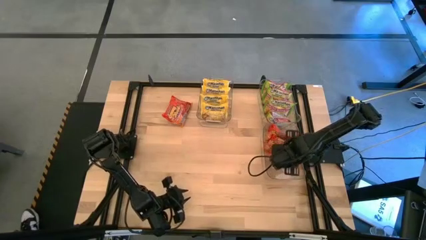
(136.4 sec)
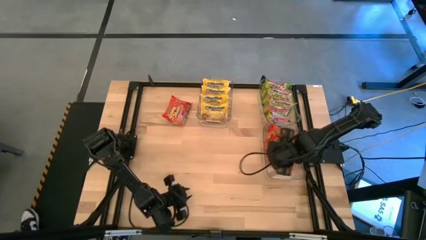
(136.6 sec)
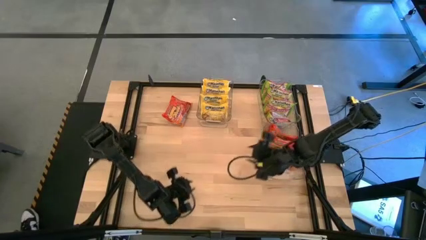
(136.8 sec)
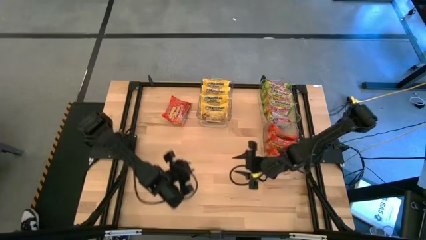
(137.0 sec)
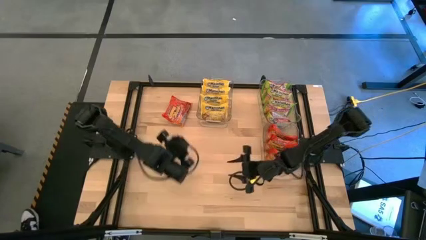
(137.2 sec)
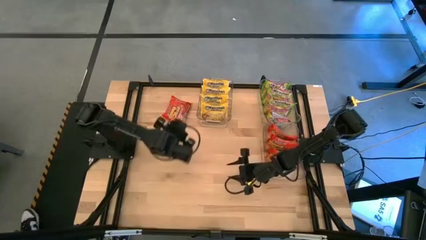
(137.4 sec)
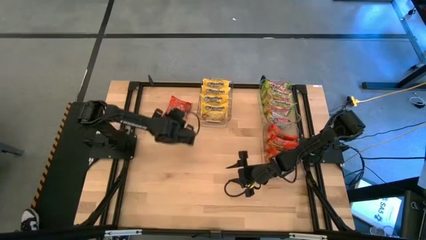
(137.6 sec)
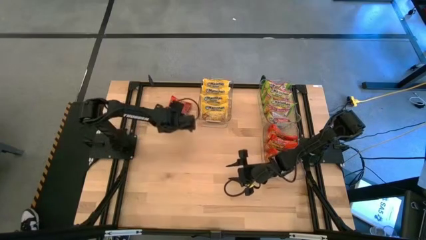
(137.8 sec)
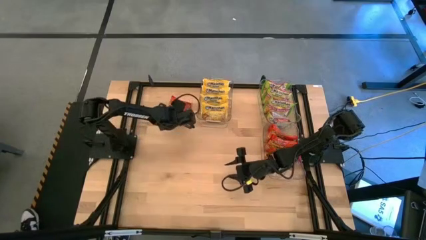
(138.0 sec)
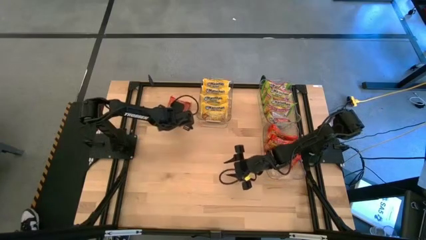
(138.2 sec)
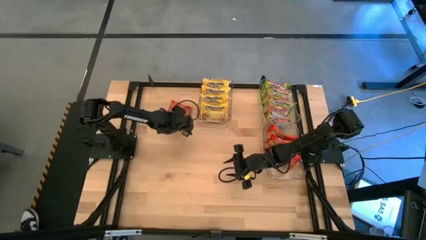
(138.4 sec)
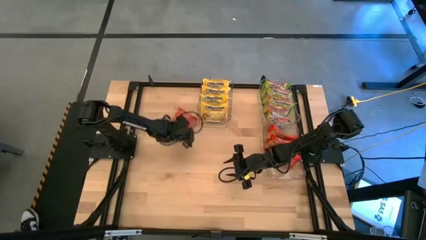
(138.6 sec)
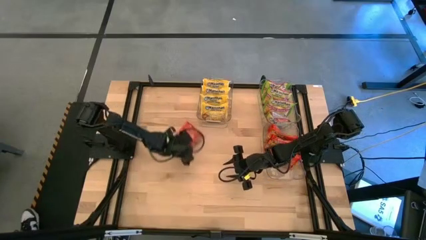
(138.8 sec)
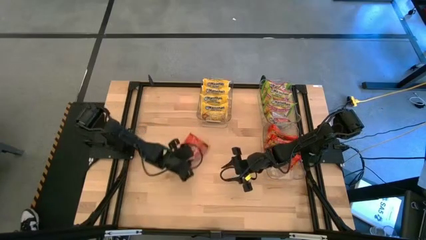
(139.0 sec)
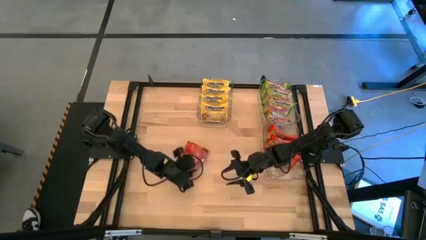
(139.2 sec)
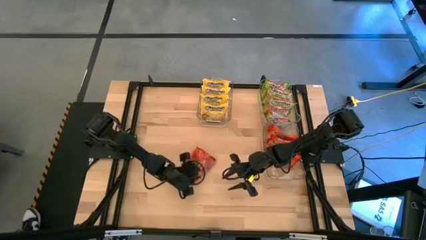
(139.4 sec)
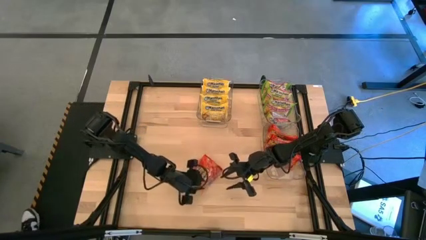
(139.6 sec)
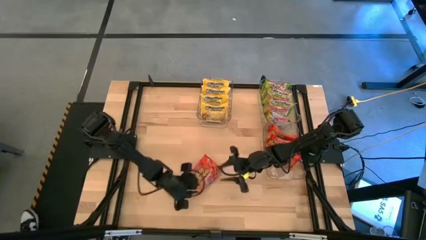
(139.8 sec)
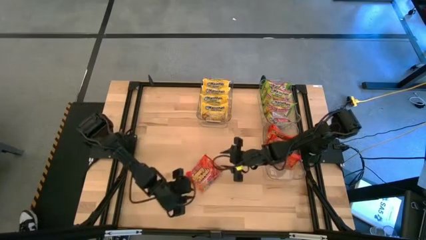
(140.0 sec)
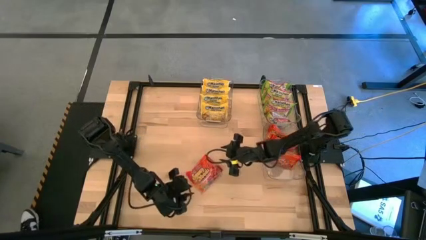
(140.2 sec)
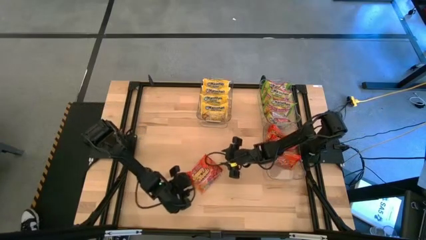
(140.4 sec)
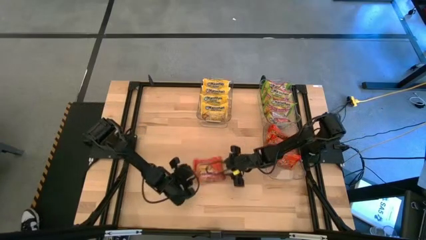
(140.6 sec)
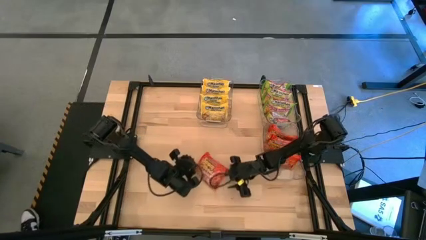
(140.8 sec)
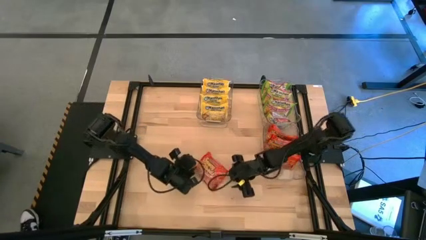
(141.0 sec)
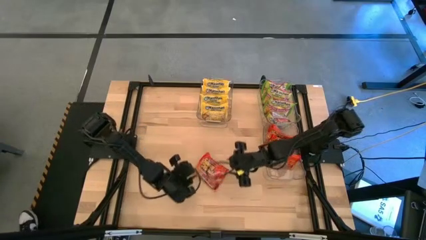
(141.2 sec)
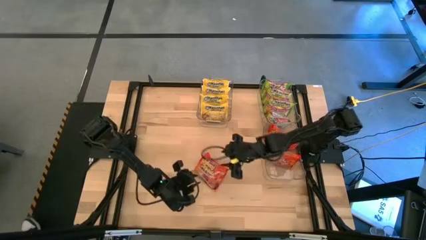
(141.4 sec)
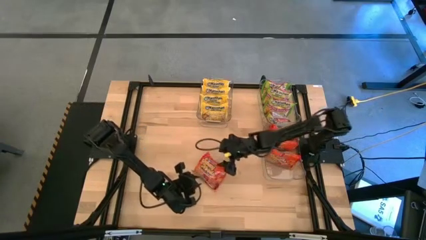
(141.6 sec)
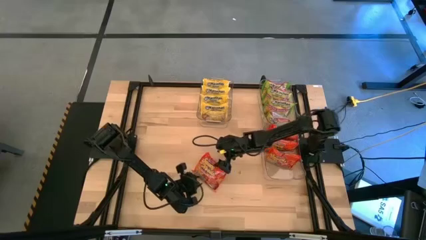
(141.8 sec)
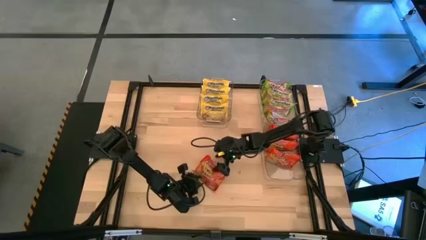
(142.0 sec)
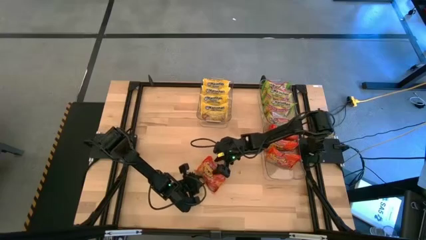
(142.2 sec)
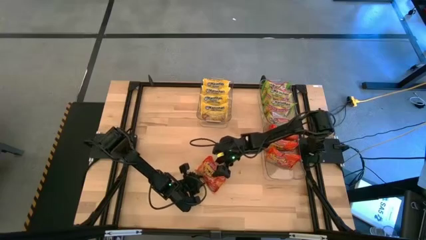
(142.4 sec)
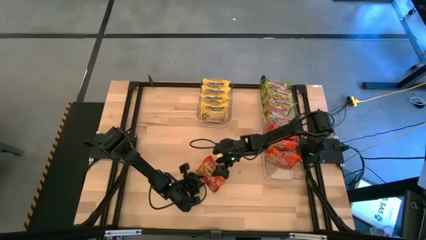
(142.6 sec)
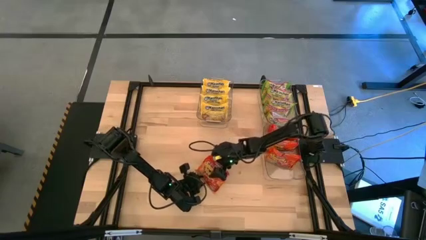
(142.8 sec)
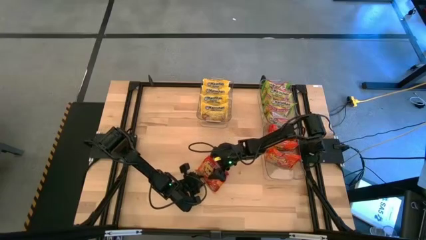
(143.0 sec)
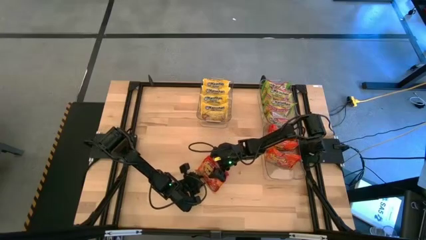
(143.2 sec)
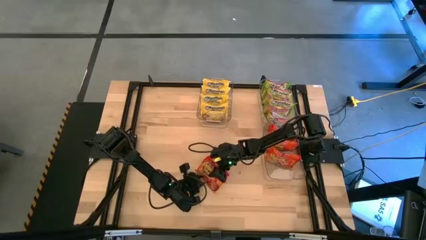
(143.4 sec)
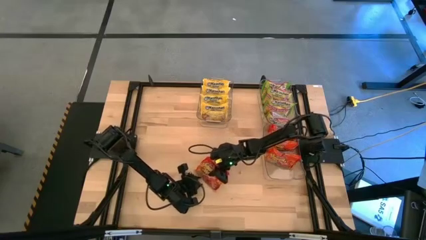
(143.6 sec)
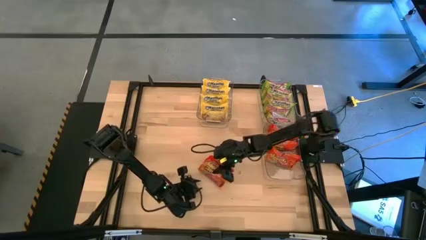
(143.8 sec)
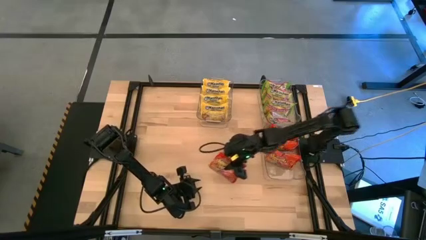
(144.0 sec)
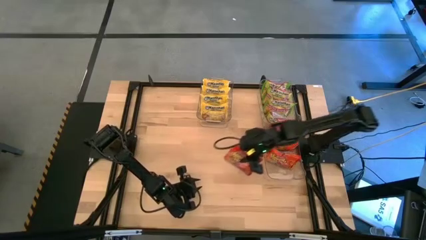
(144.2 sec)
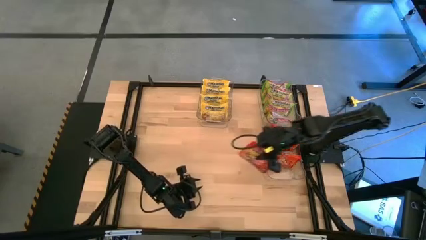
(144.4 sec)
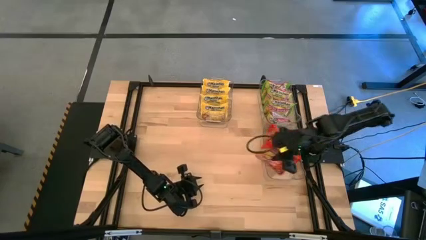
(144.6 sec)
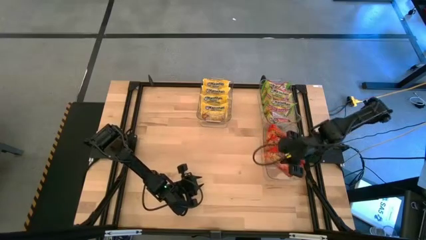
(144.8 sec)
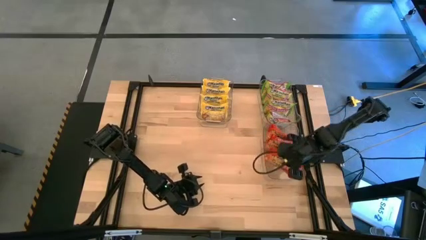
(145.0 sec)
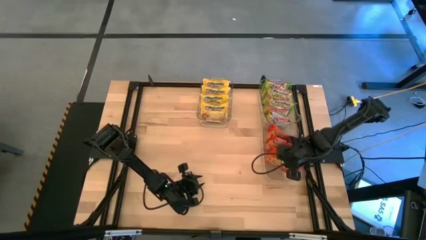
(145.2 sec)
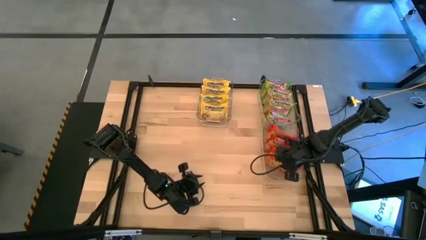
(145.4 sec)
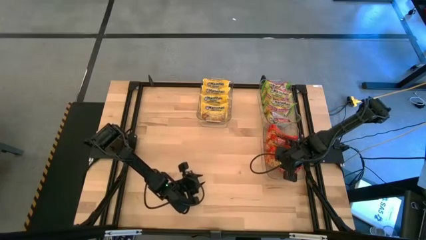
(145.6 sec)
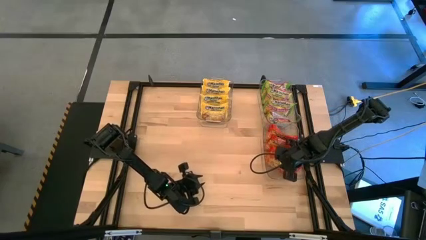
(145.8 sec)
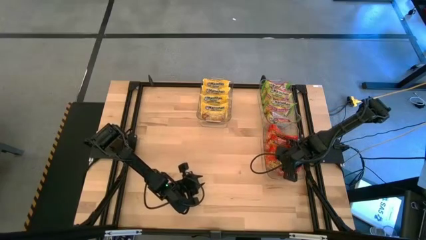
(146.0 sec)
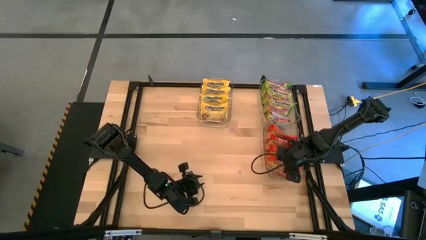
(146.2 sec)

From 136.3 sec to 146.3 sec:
Task: Sort Maruchan noodles
Put the orange noodle pack into the bottom right transparent bin

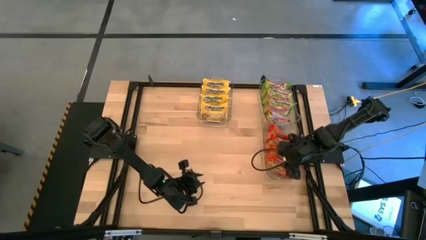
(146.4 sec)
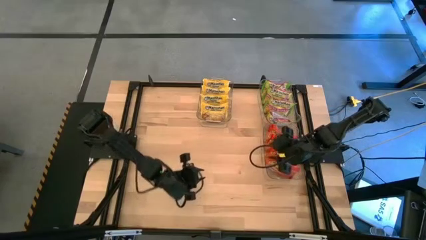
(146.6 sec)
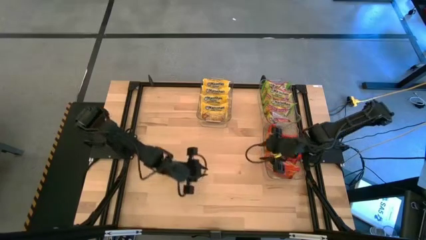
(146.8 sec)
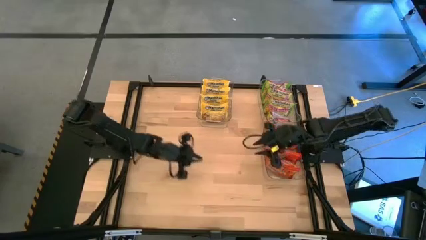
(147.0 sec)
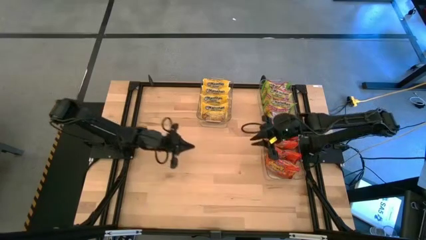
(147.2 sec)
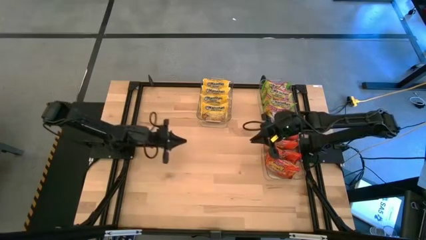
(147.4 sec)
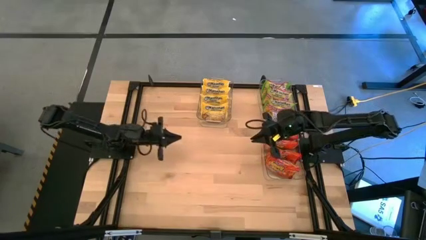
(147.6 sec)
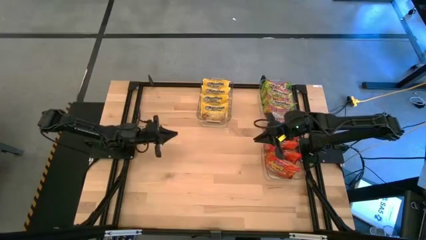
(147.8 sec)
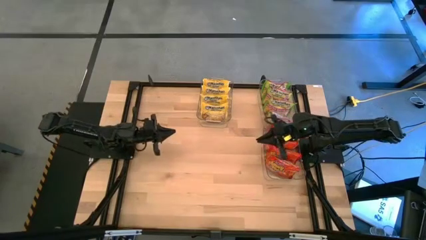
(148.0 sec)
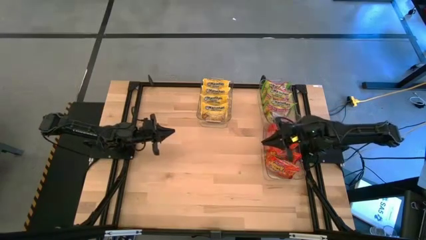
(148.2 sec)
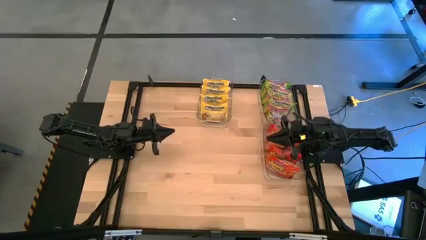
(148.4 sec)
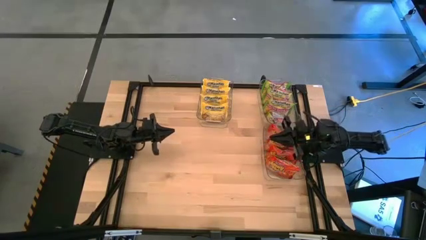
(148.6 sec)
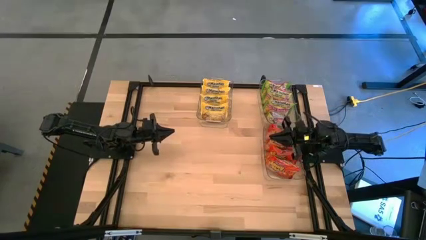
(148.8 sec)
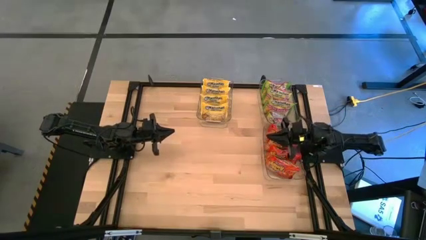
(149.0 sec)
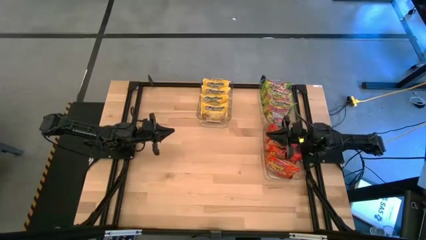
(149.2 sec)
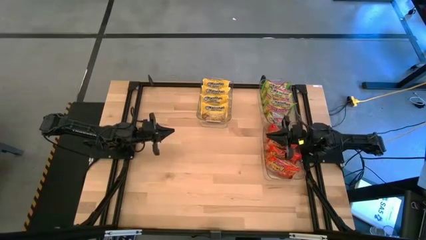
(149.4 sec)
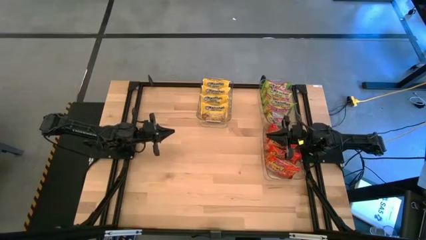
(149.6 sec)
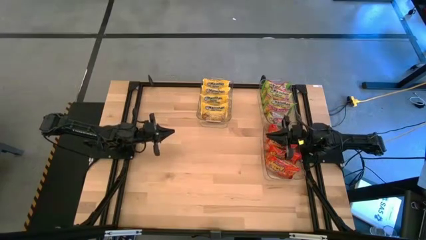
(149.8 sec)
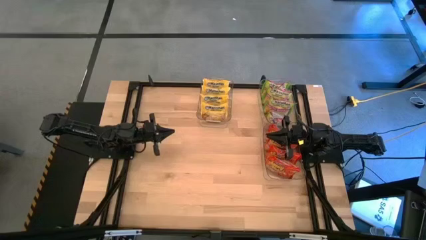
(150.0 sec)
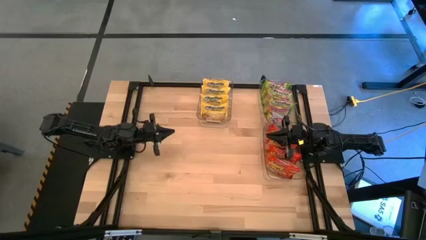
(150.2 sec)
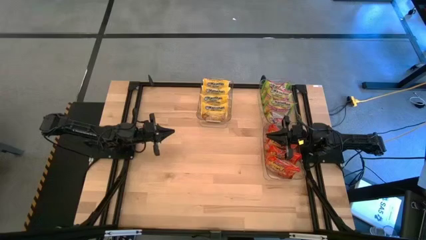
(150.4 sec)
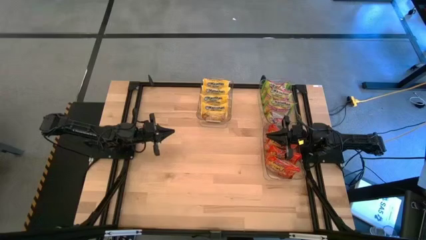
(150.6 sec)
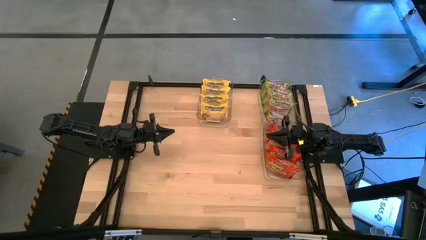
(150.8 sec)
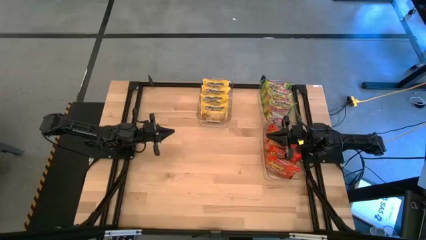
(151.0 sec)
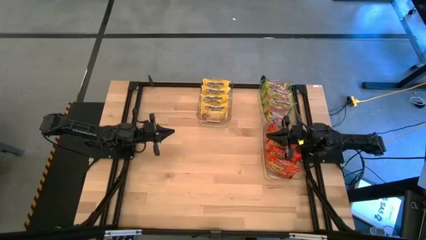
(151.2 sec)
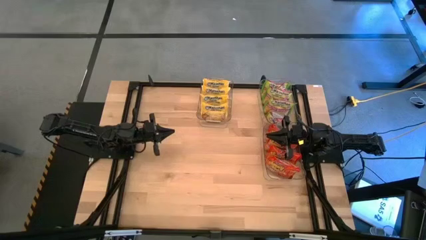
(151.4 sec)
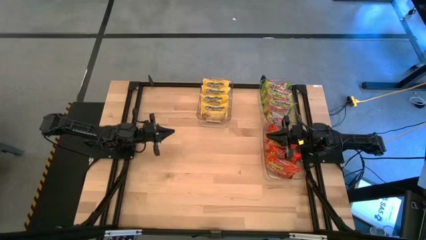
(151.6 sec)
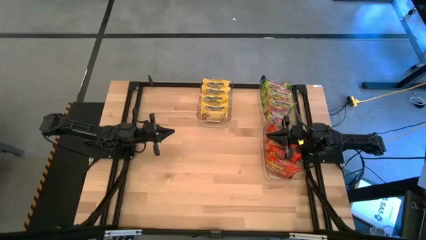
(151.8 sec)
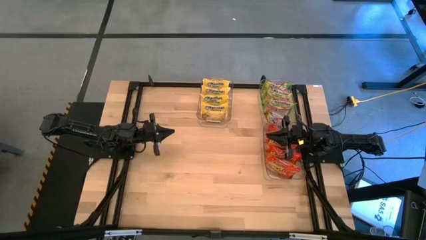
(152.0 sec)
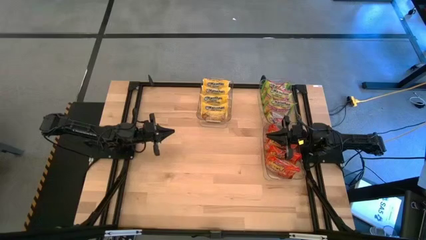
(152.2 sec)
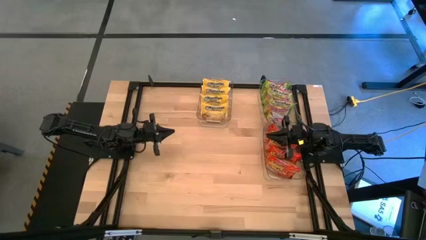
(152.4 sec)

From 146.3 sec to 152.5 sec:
Return to Home Position
